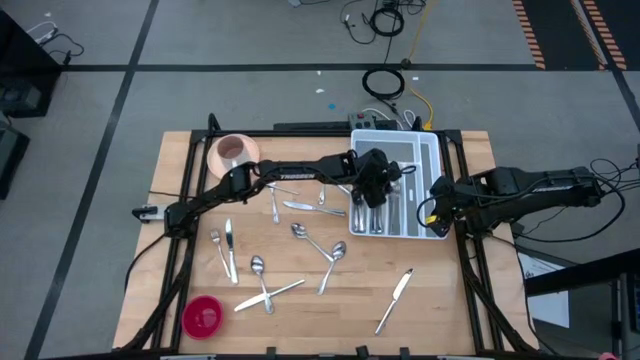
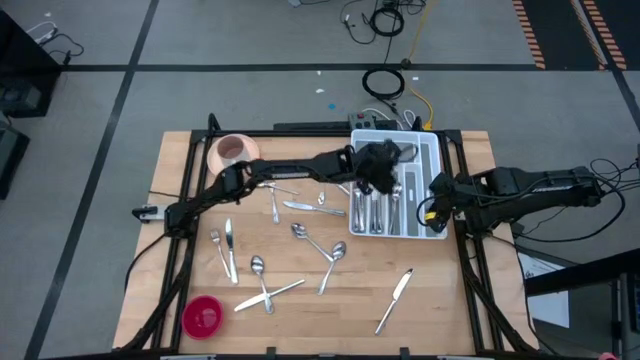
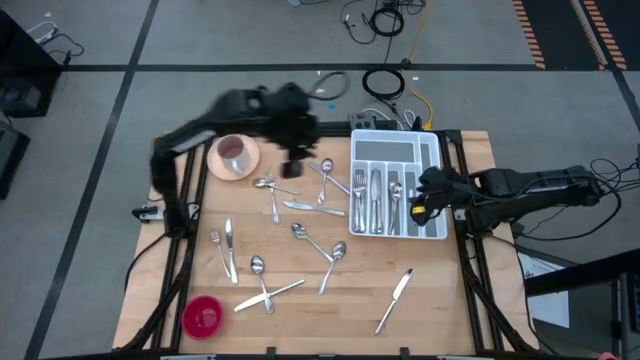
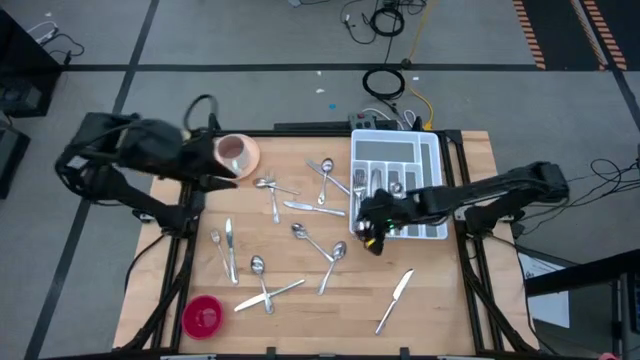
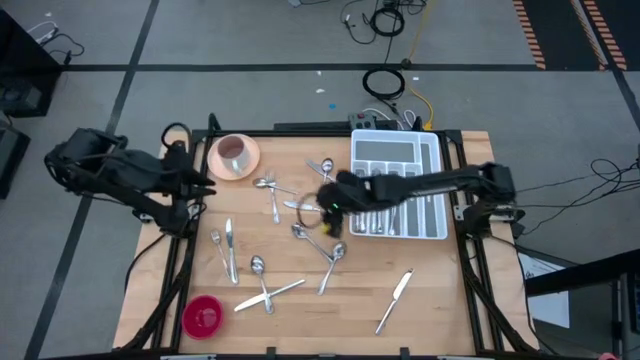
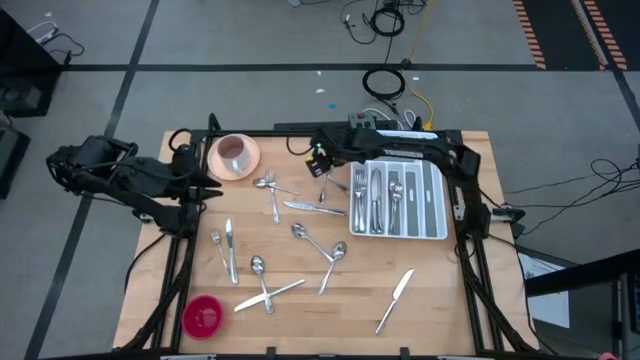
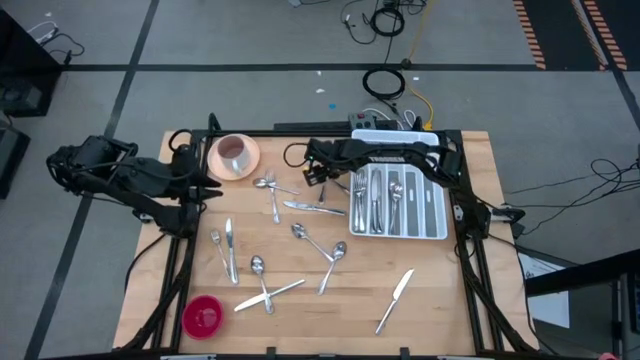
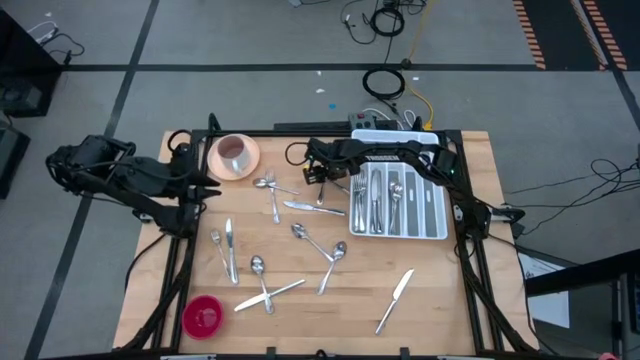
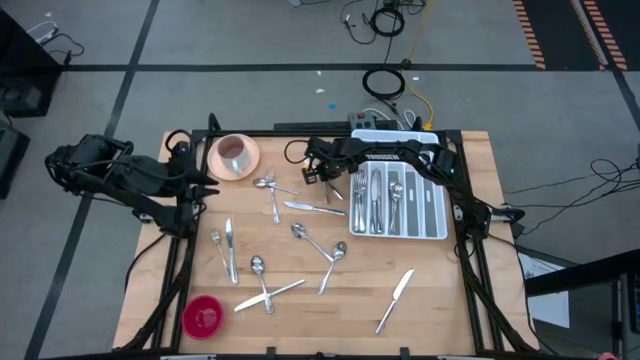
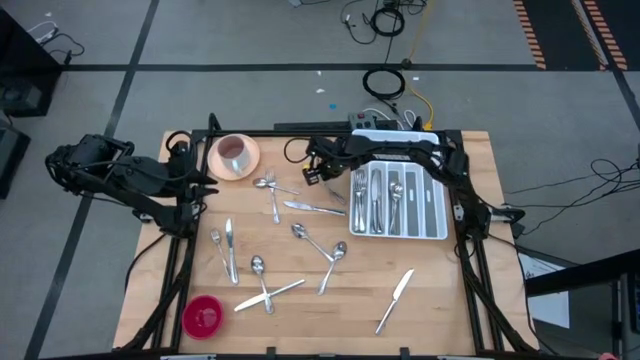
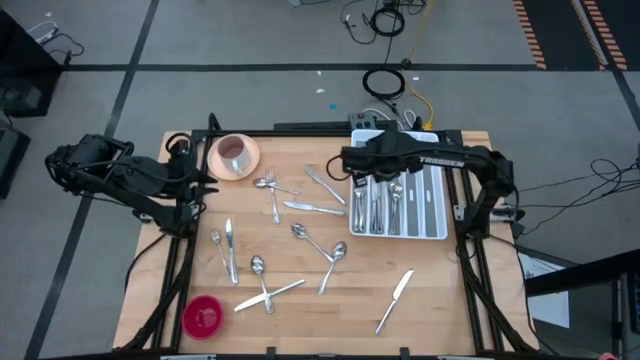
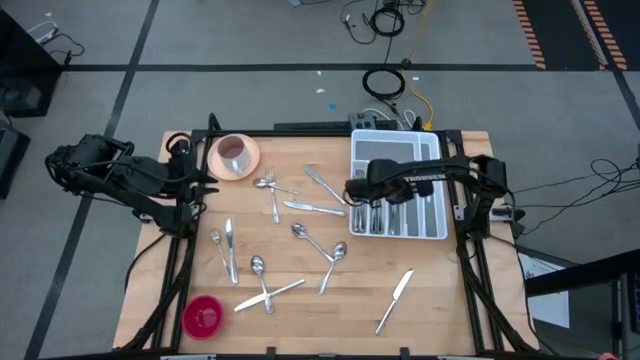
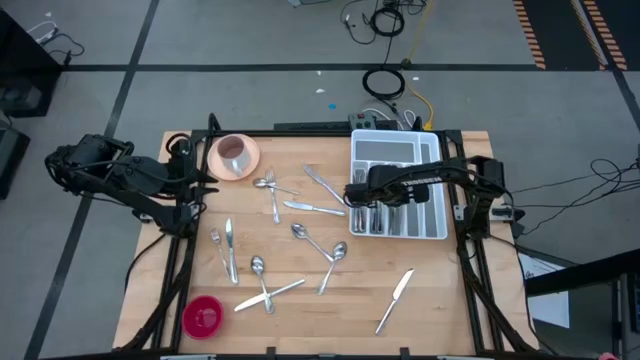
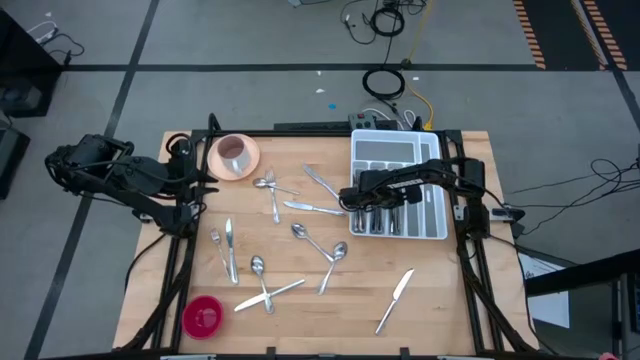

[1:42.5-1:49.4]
Task: Sort silverware
Put the silver spoon into the white silverware tray

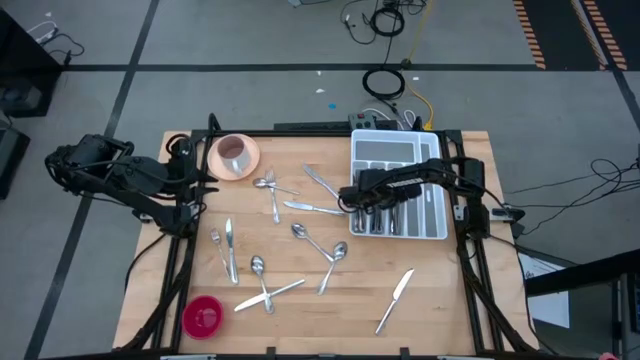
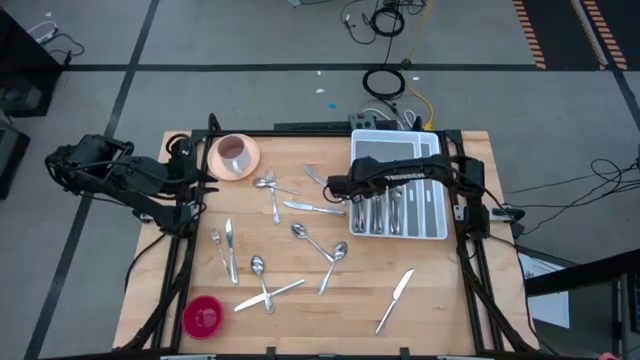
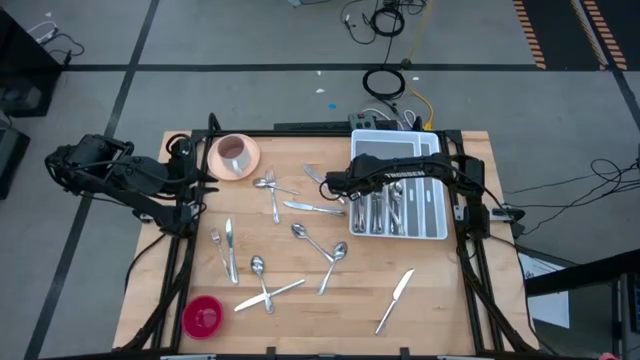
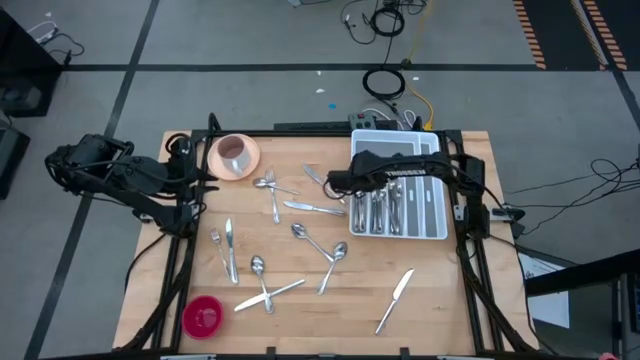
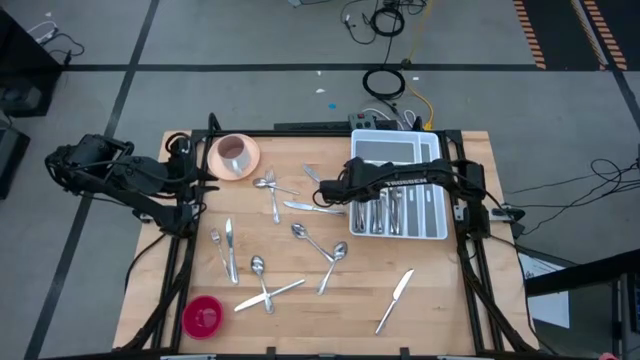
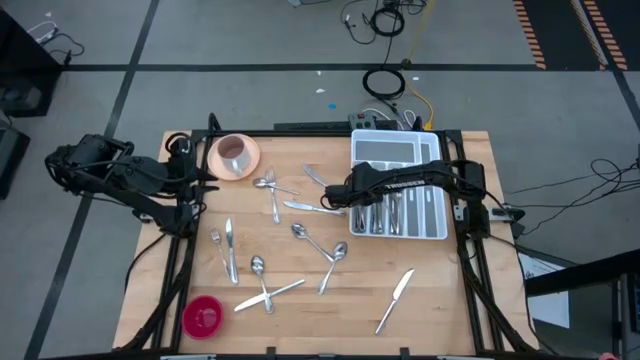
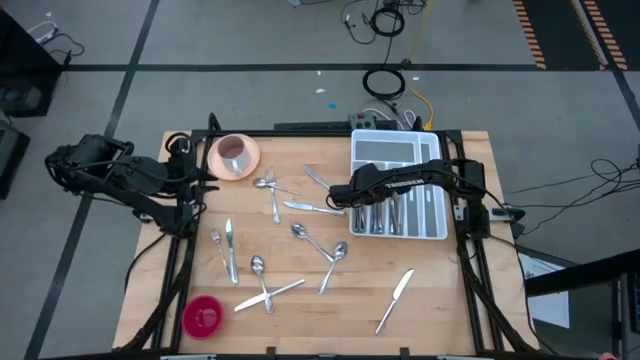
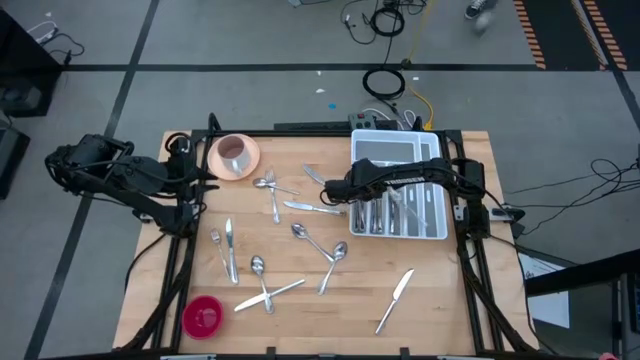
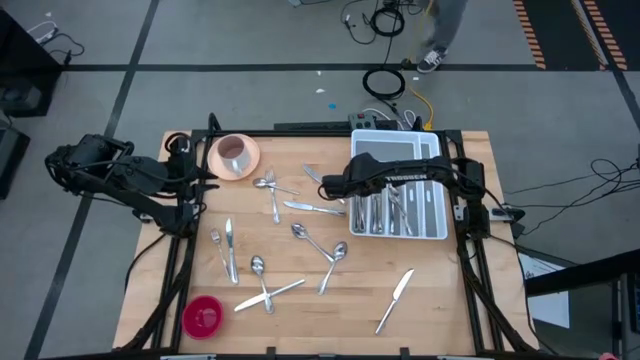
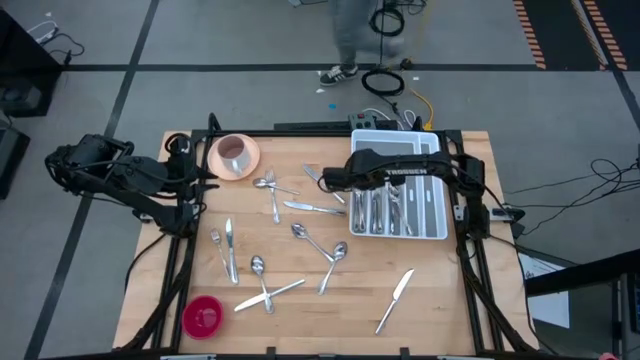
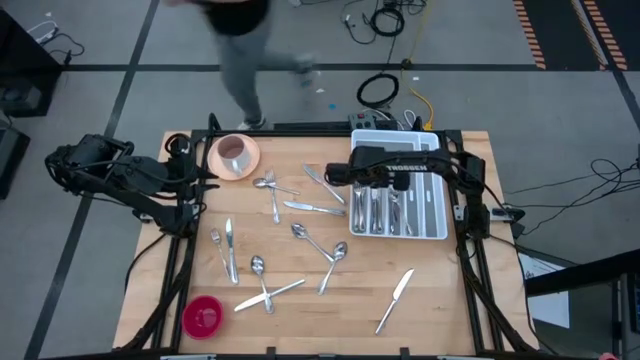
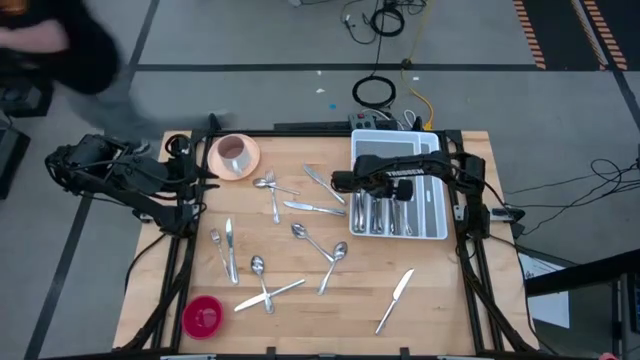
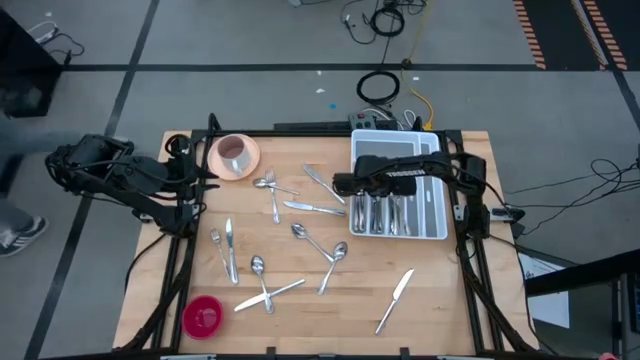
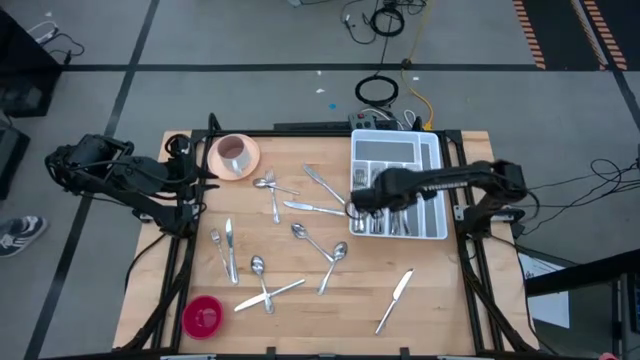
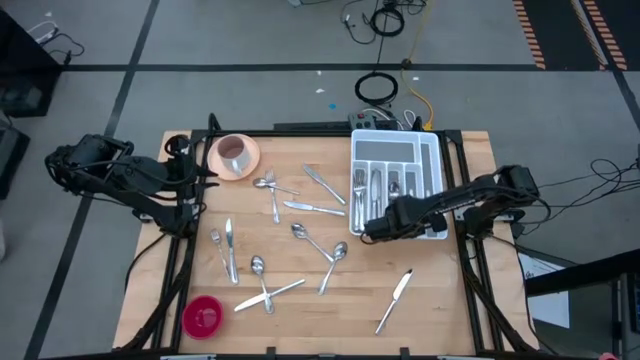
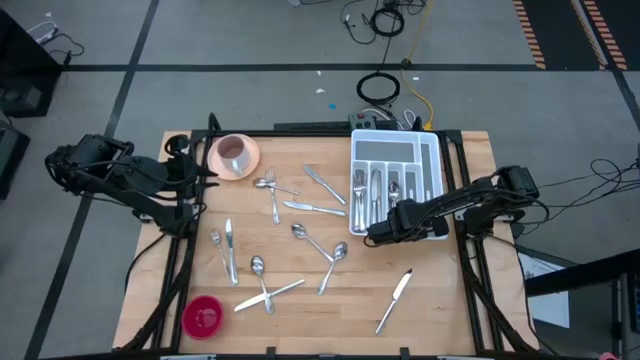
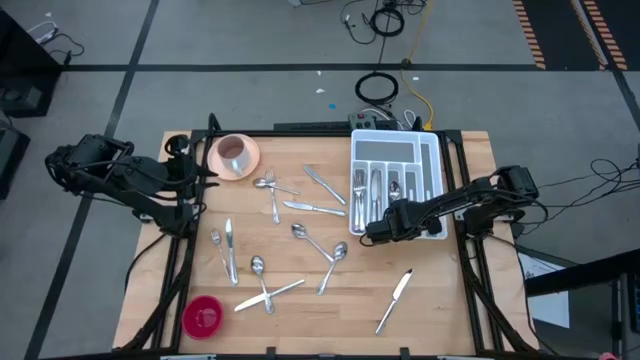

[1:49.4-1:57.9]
Adjust the silver spoons in the white silverware tray

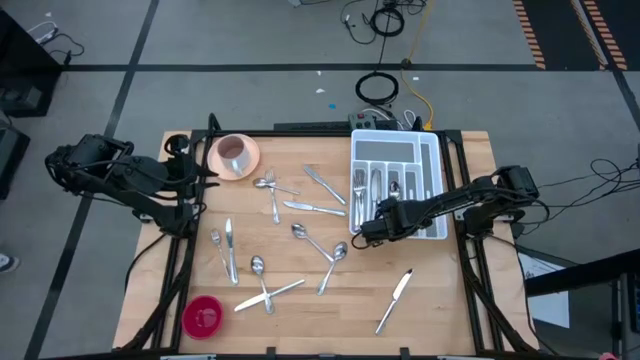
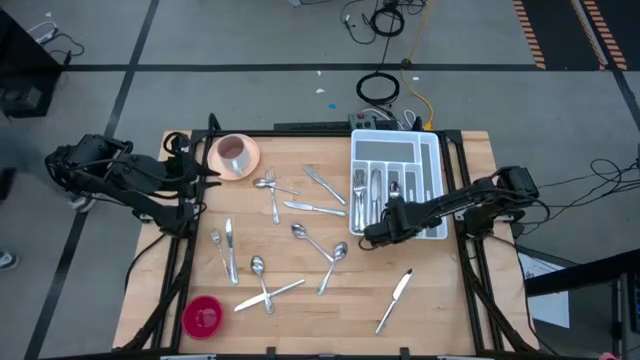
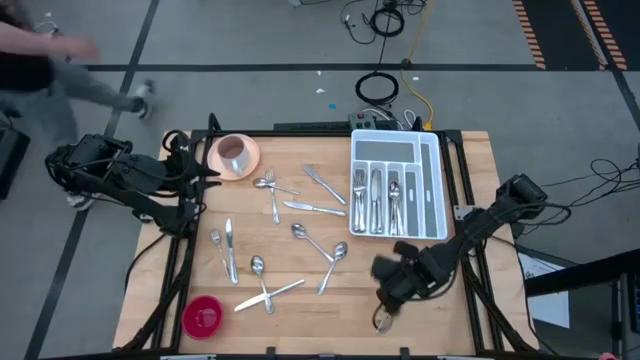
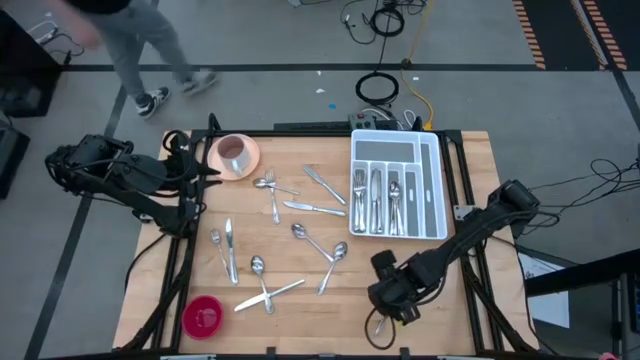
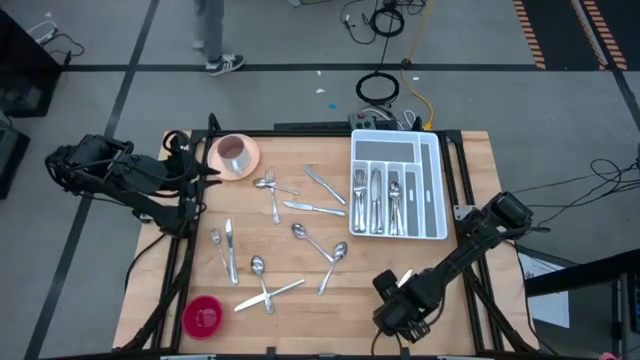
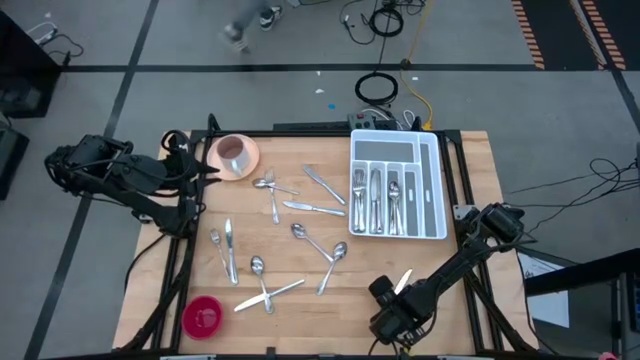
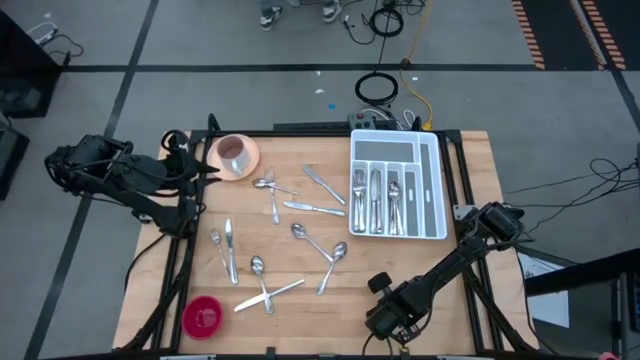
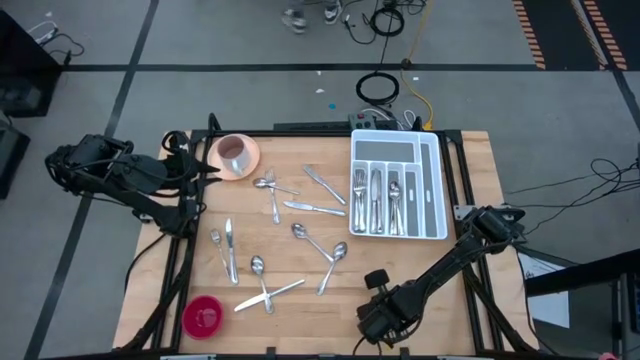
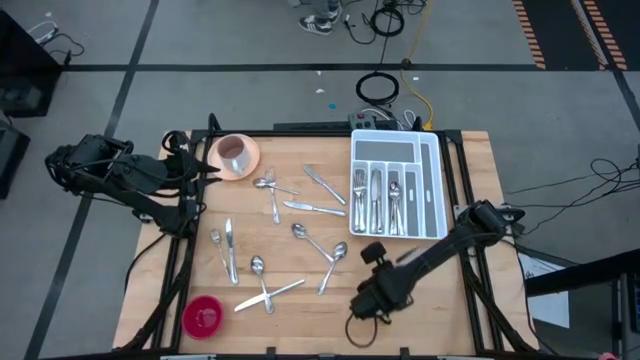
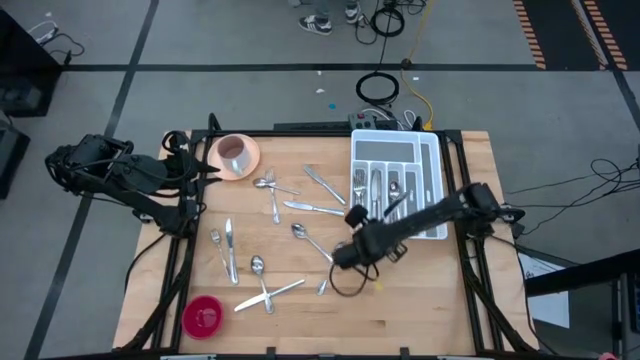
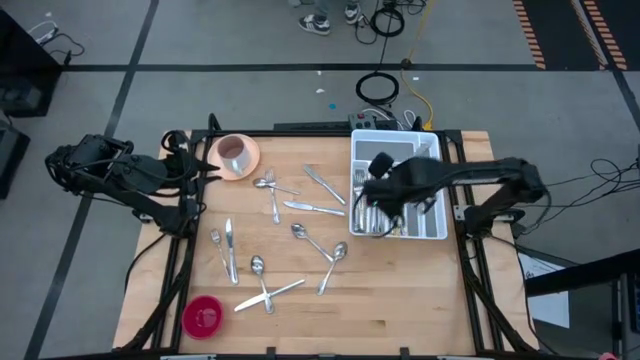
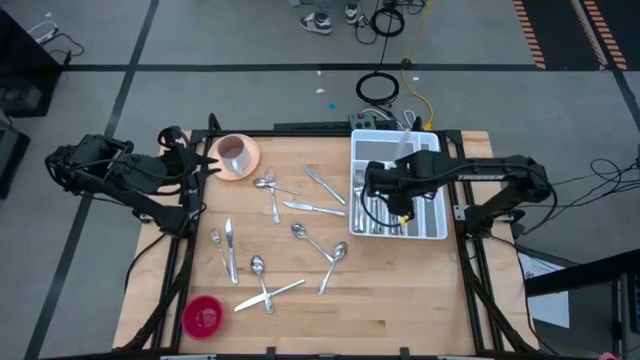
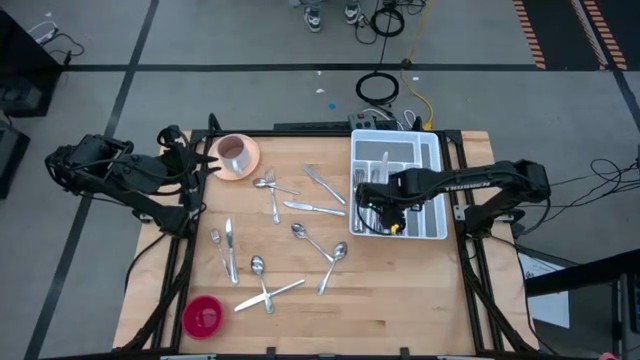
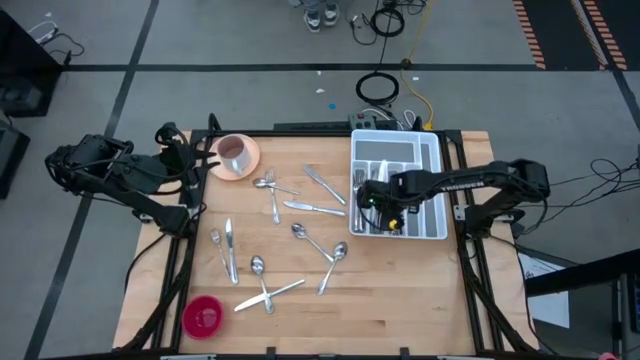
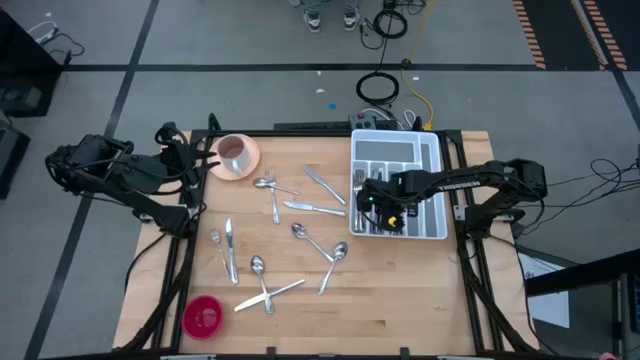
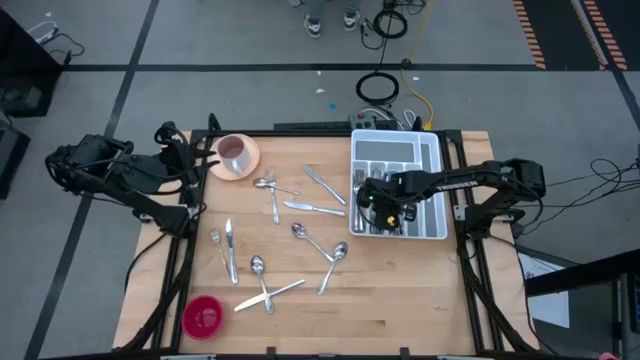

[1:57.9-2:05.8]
Put the silver knife into the white silverware tray
